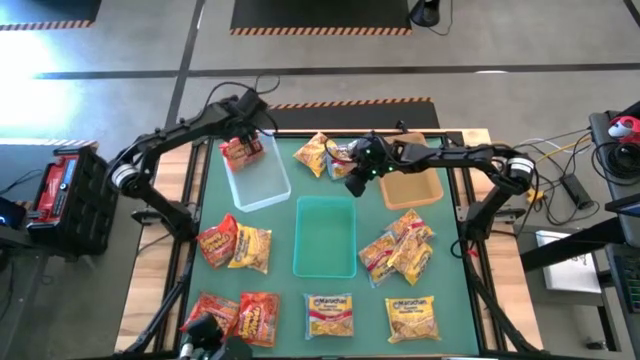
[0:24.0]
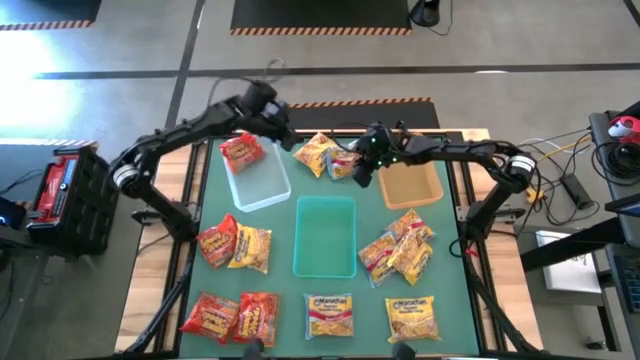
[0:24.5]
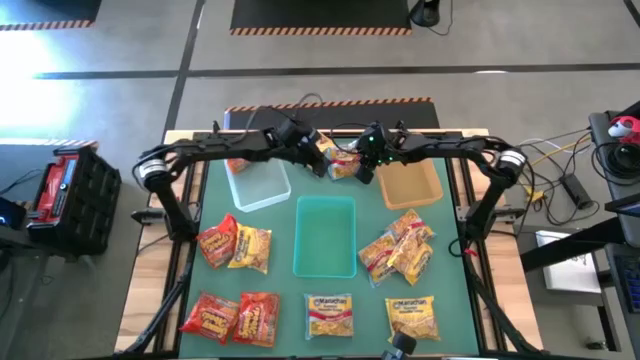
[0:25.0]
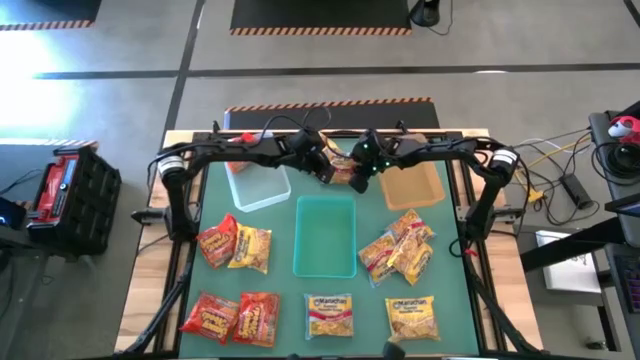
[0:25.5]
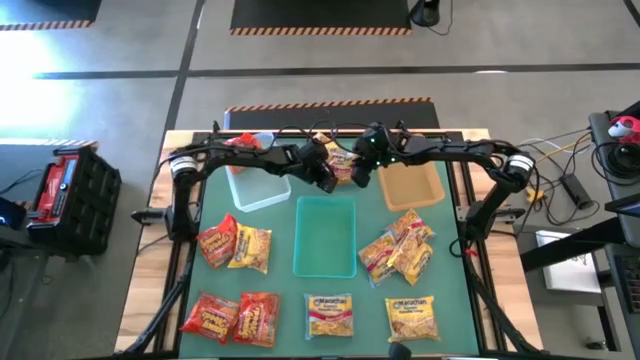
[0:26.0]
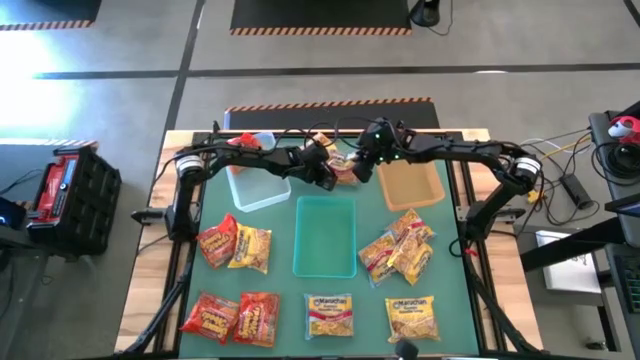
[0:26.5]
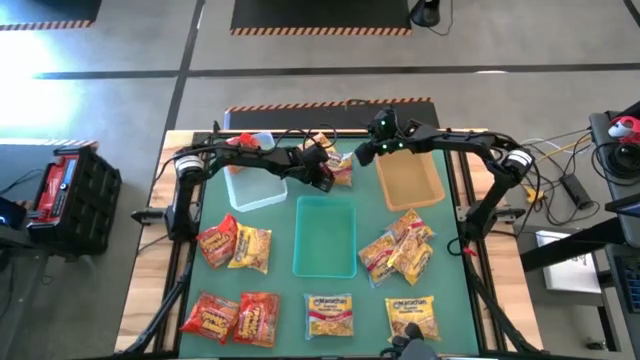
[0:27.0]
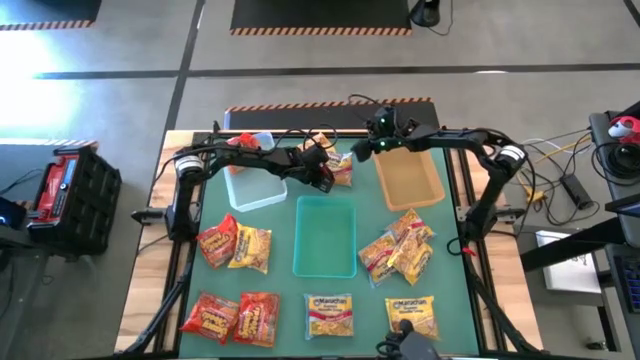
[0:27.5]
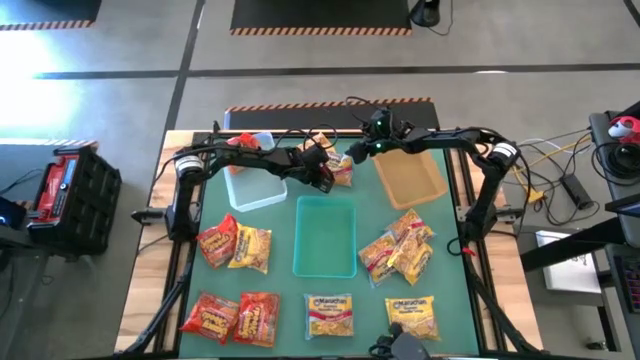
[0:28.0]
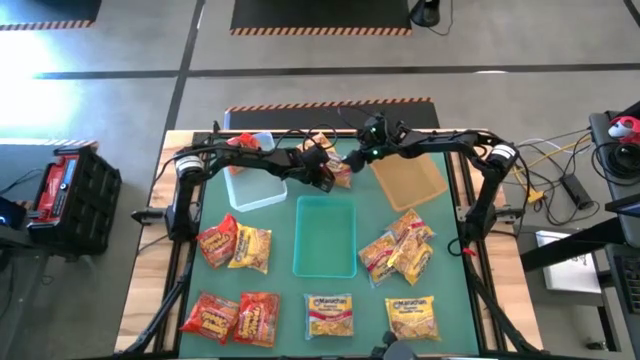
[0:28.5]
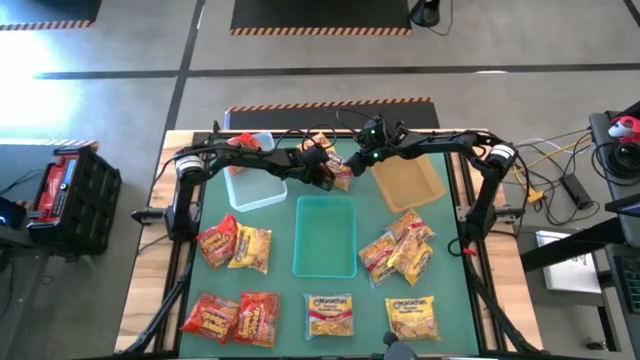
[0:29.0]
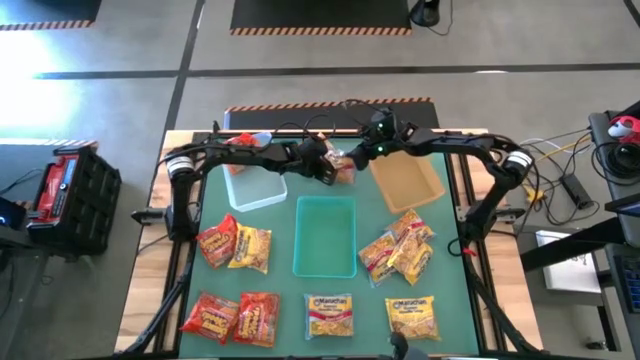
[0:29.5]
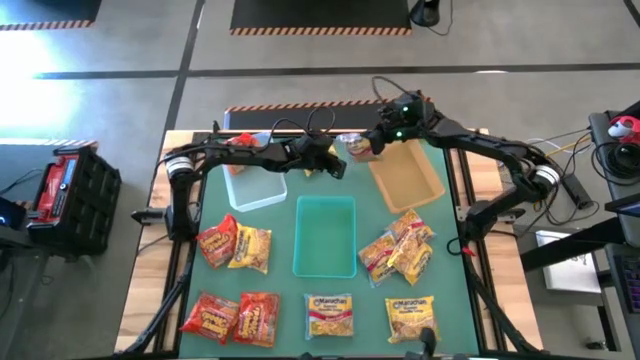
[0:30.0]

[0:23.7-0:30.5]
Task: Sort Maruchan noodles
Put the blue noodle pack into the orange bin

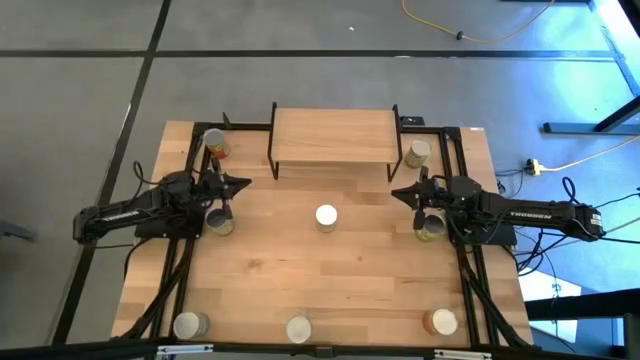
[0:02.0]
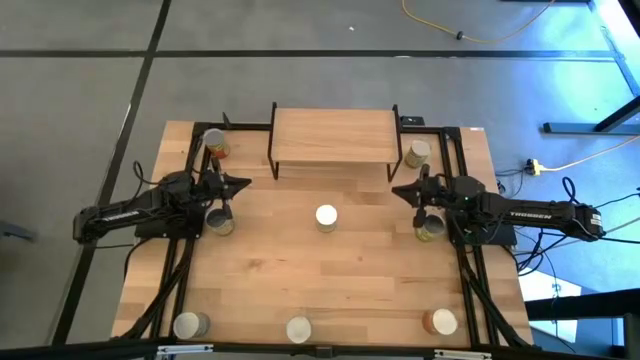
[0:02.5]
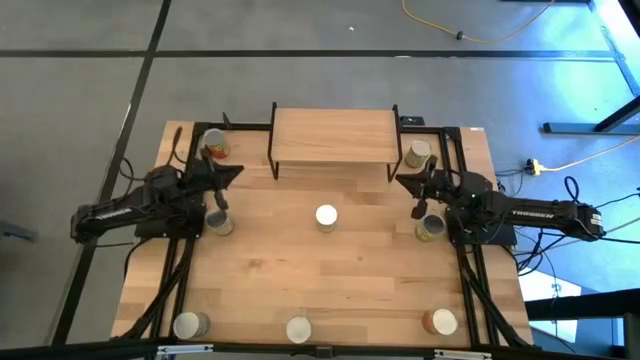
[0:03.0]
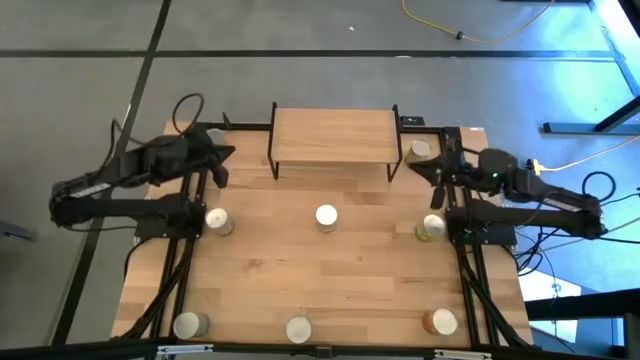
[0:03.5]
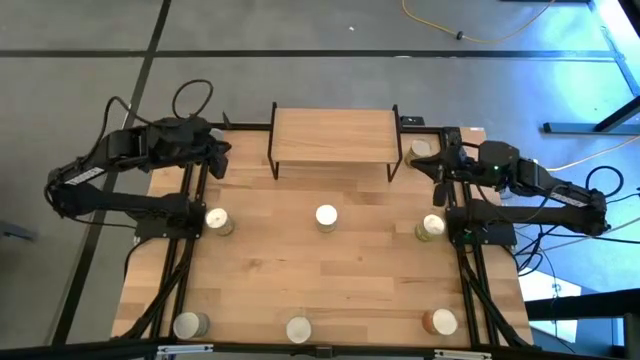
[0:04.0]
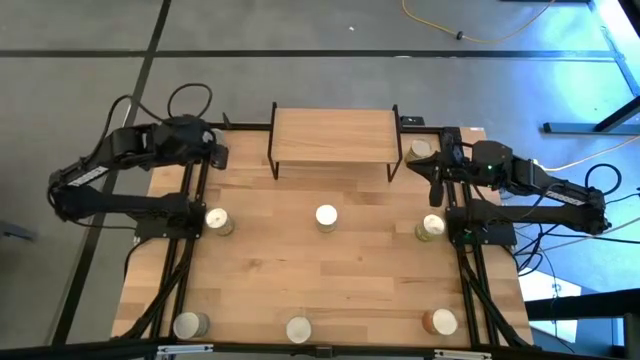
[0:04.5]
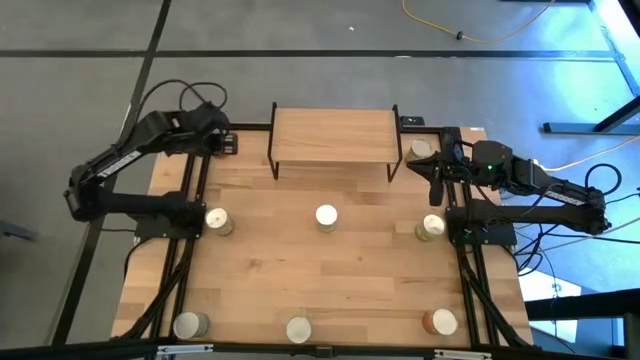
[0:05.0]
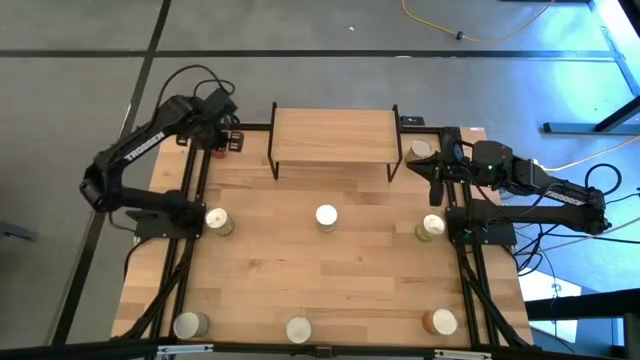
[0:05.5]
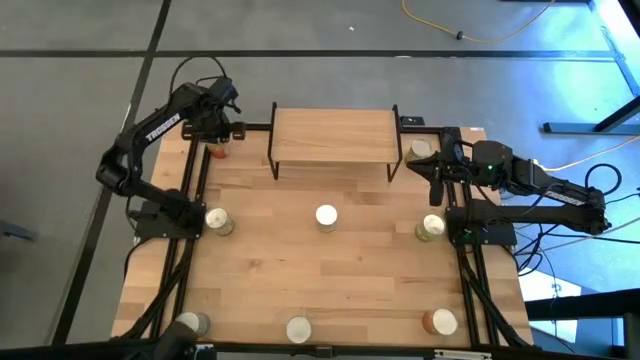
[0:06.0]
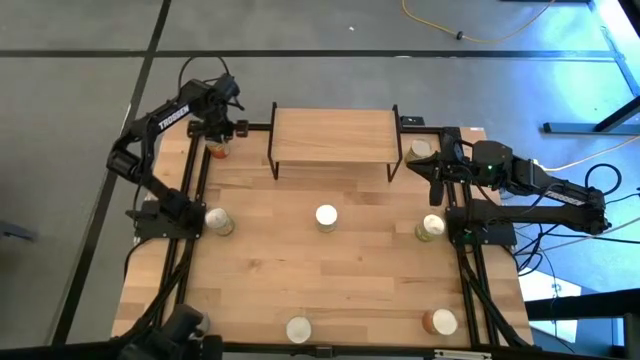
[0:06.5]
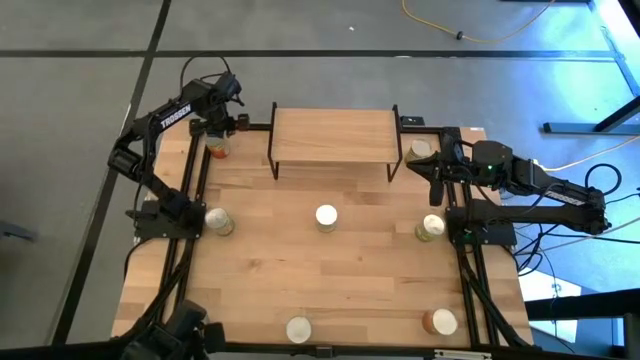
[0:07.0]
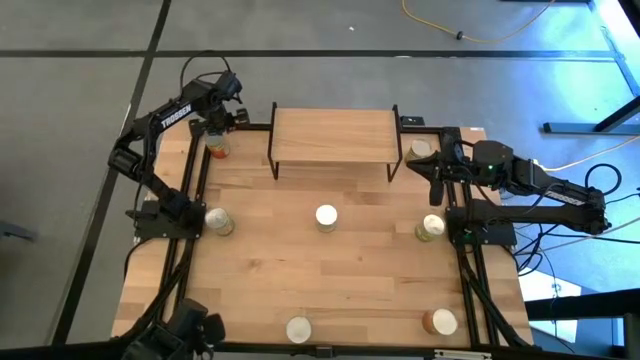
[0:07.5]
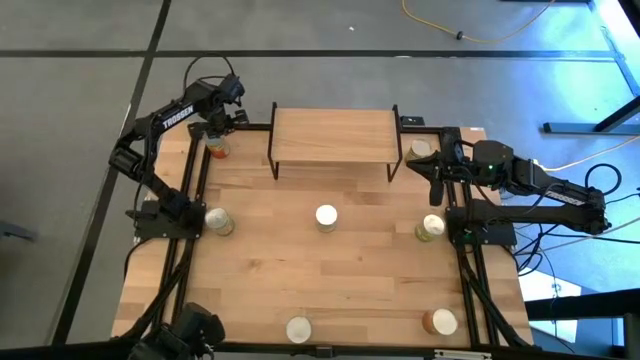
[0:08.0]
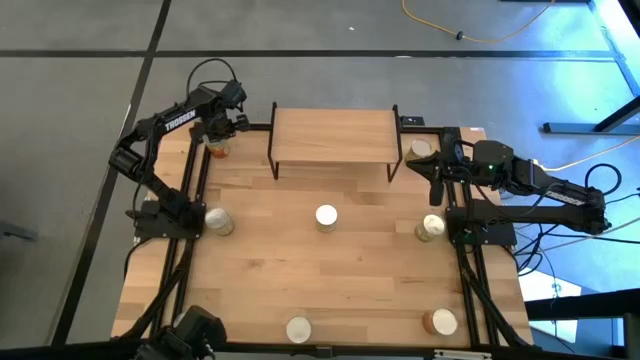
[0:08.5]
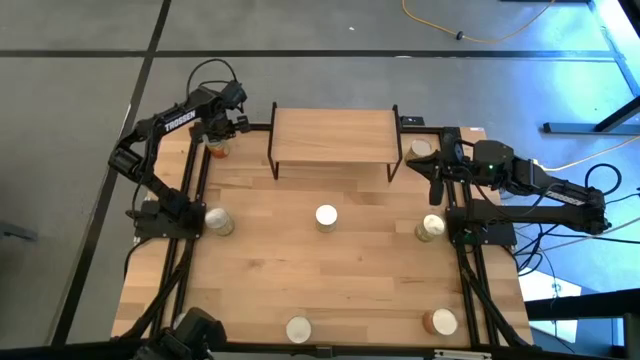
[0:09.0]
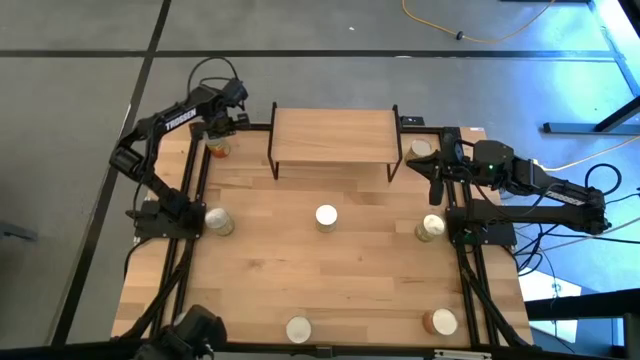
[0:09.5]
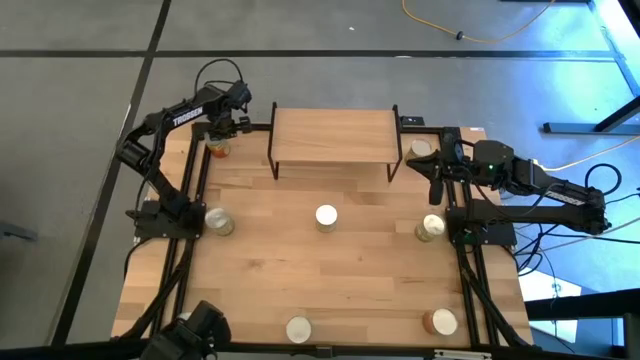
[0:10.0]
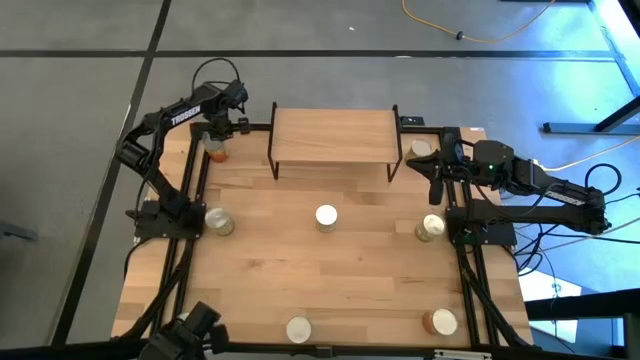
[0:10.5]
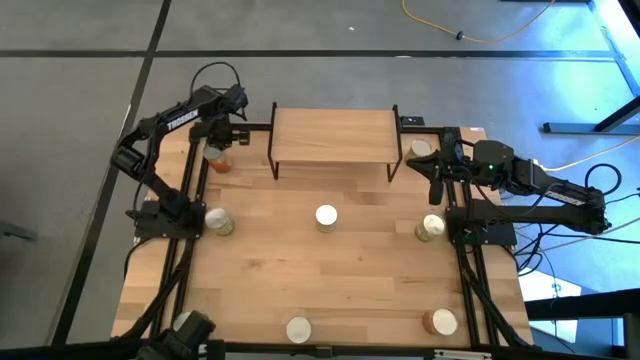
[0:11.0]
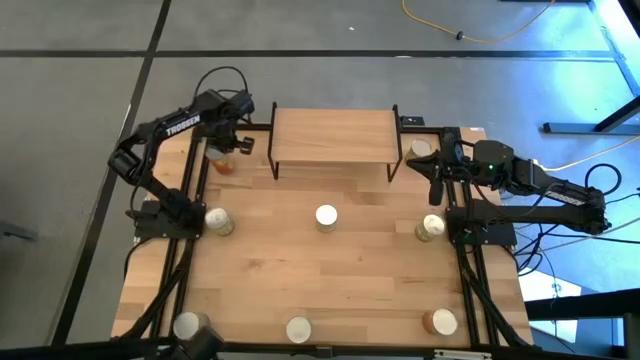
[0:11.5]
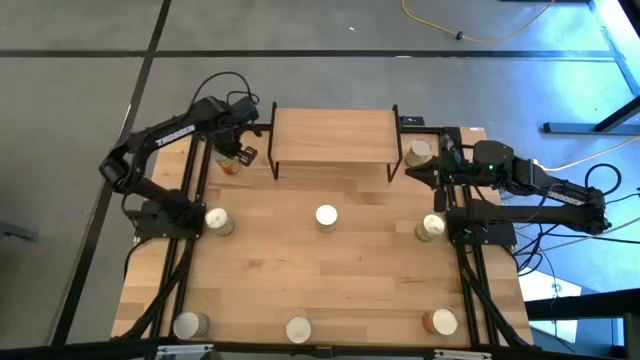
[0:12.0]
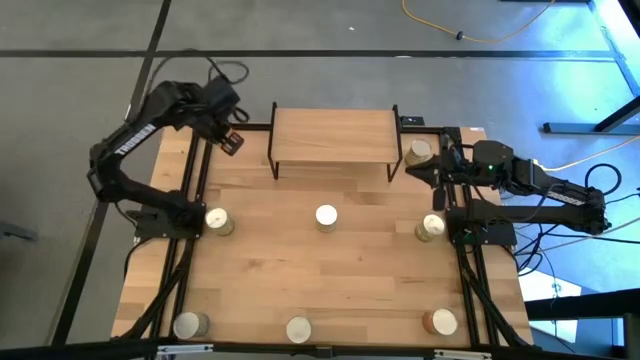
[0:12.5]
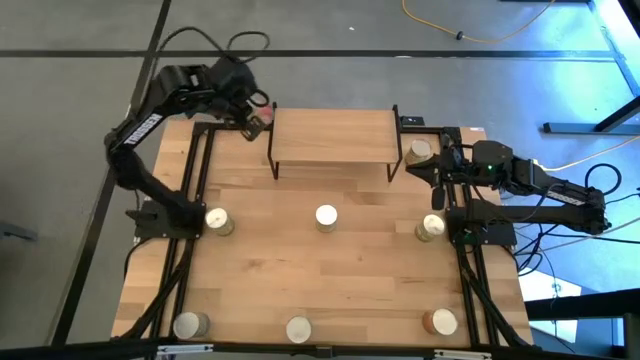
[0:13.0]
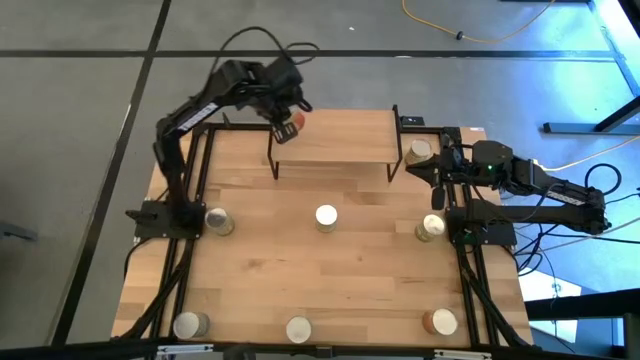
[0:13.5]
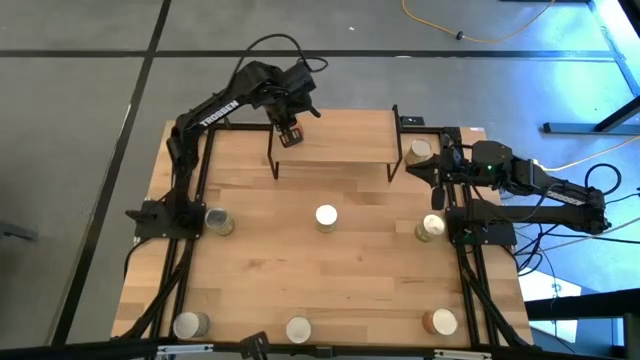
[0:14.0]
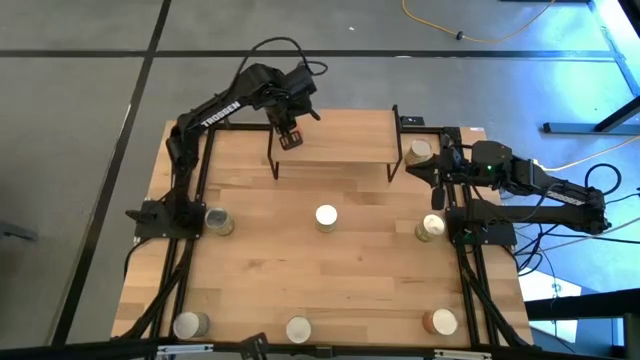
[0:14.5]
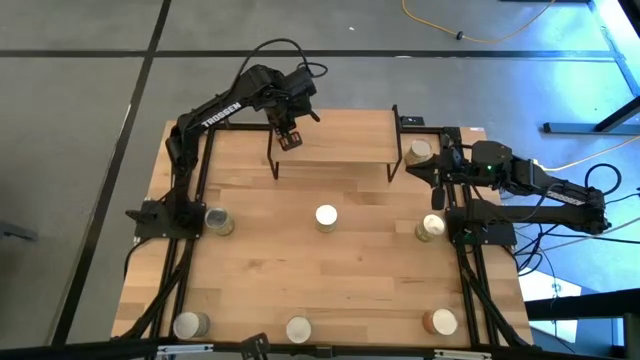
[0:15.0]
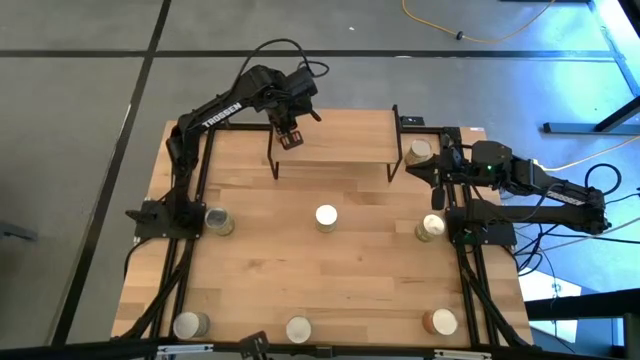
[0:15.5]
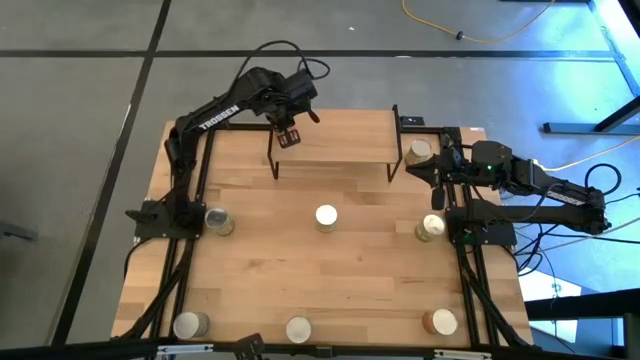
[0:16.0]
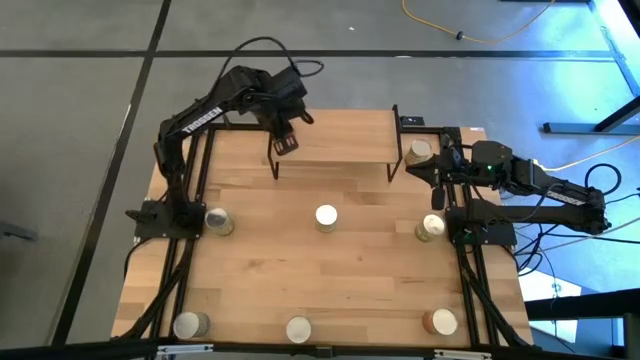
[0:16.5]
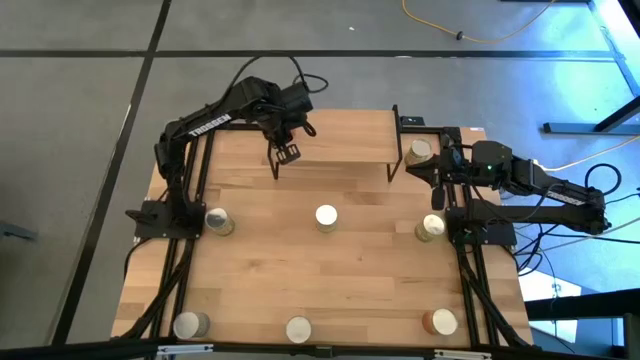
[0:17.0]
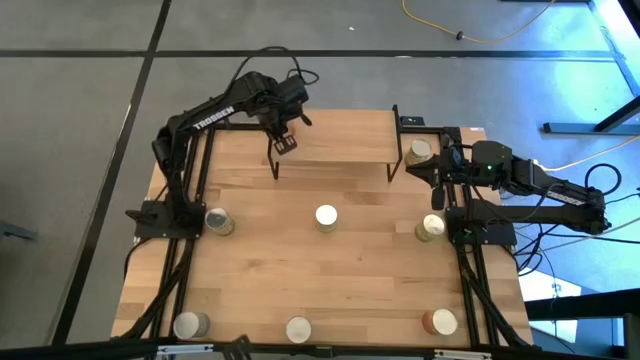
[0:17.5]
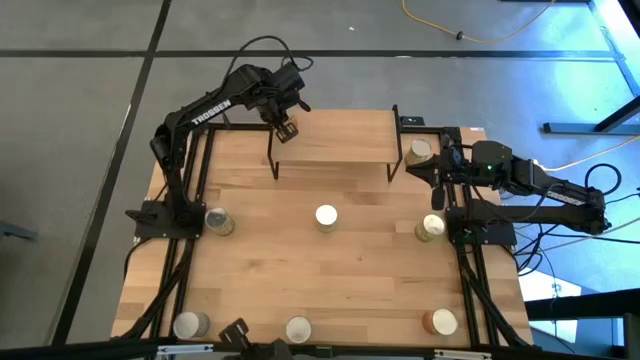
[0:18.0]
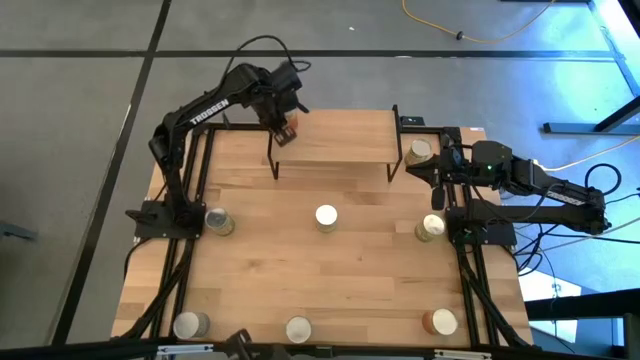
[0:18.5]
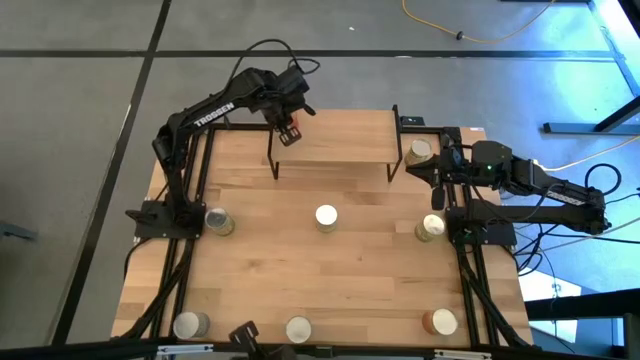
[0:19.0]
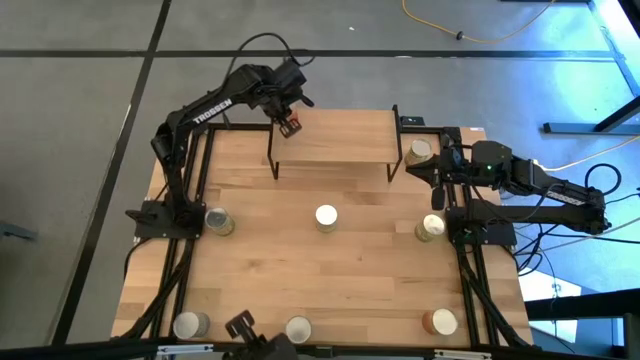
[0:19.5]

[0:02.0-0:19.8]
Task: Pick and place cans onto a shelf
Put the top canned pineapples on the shelf
